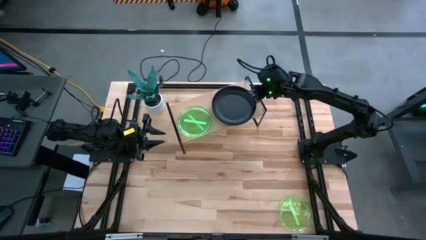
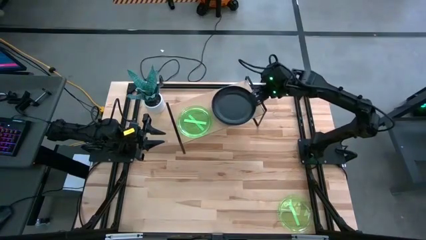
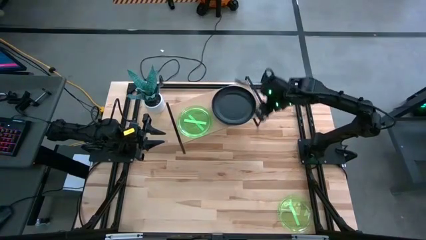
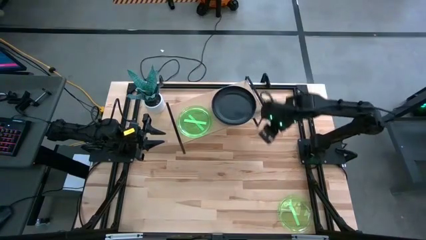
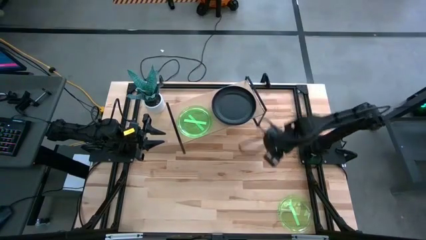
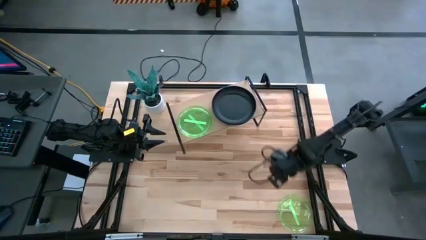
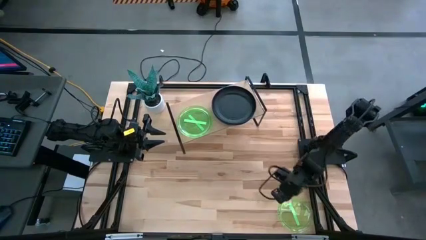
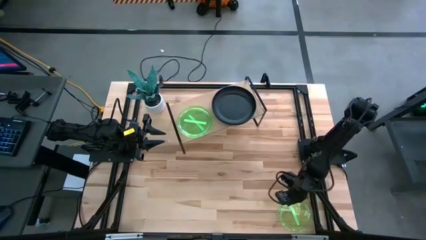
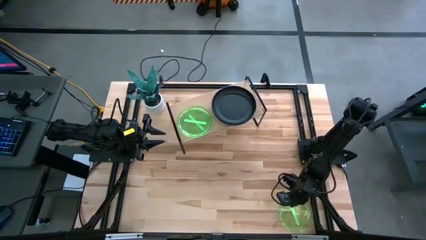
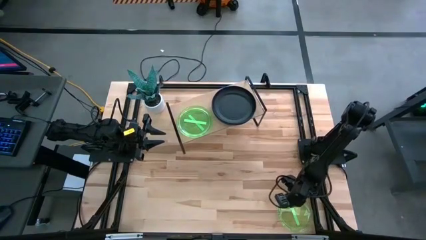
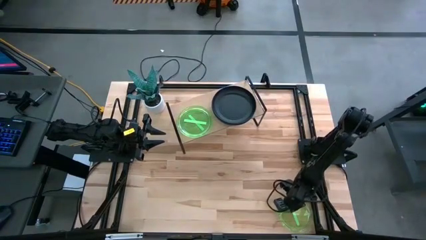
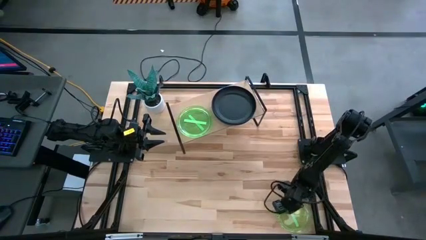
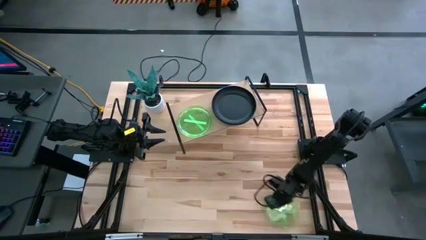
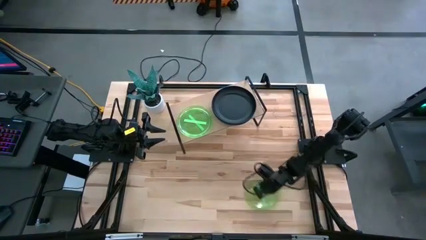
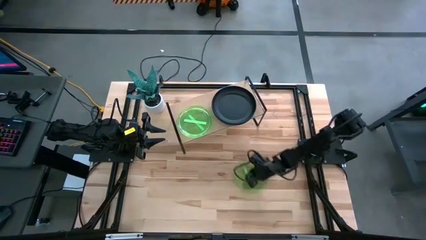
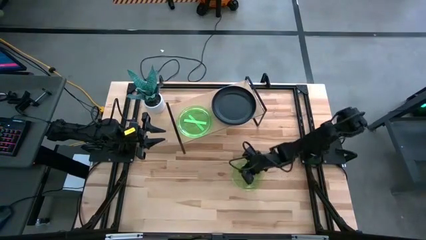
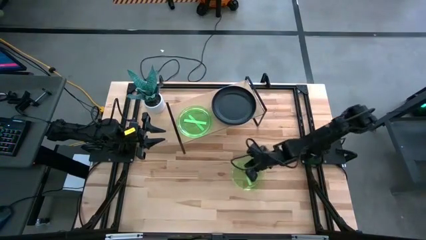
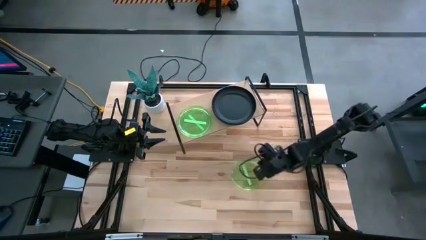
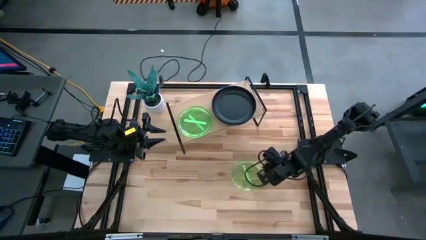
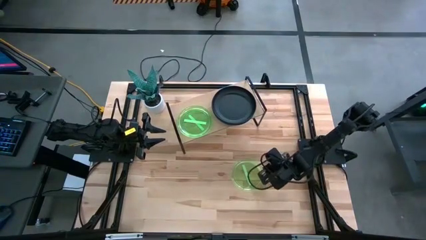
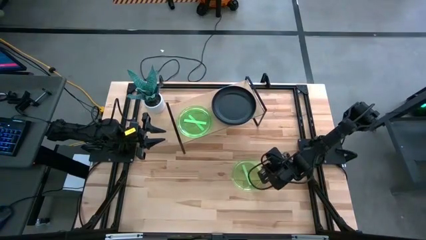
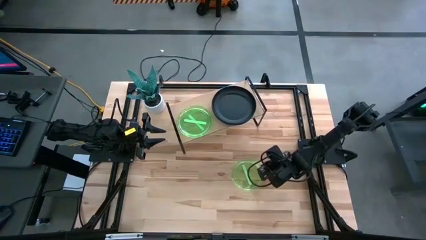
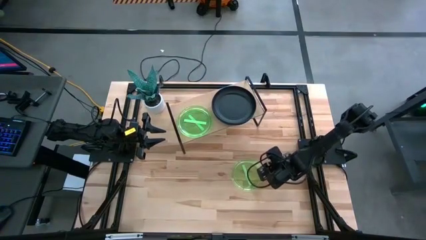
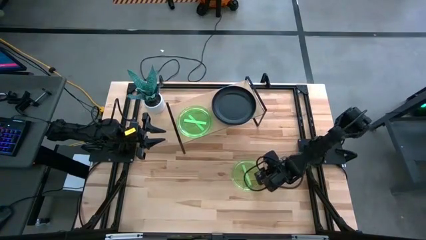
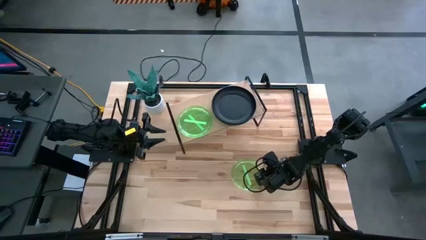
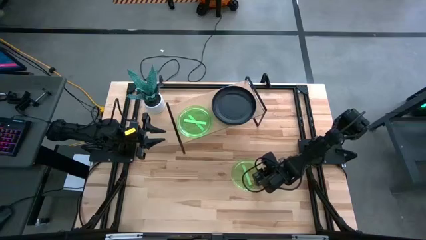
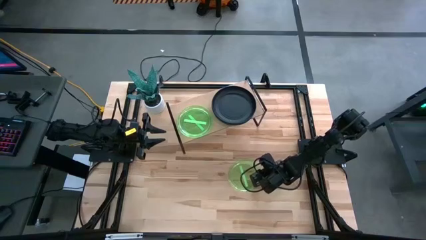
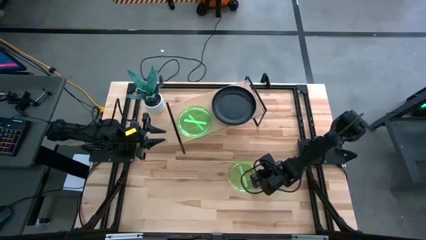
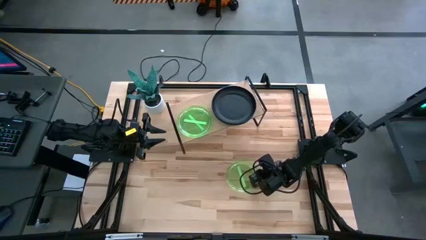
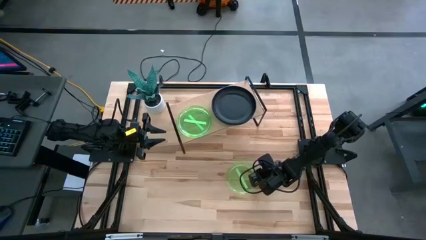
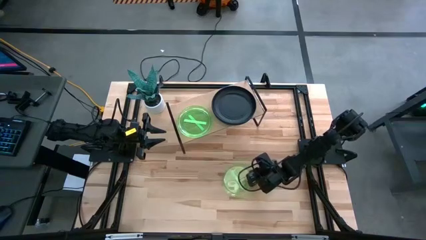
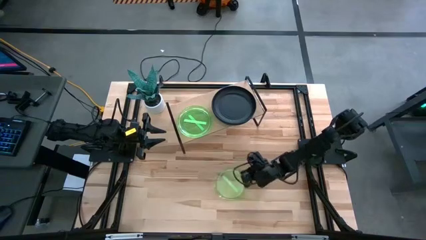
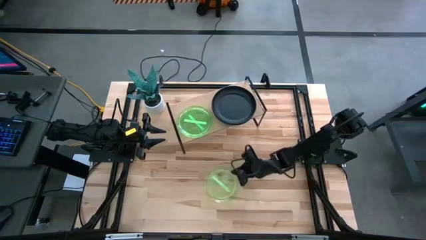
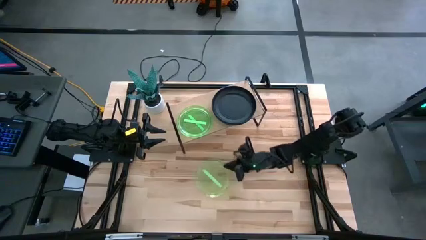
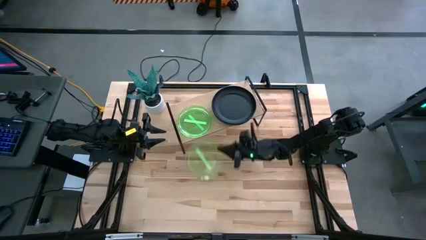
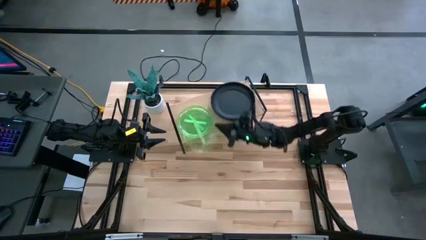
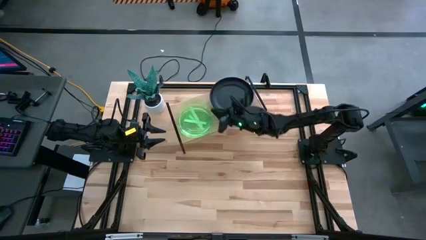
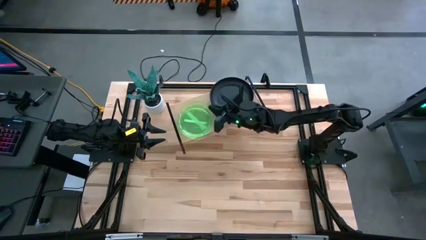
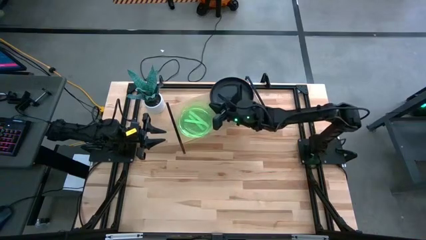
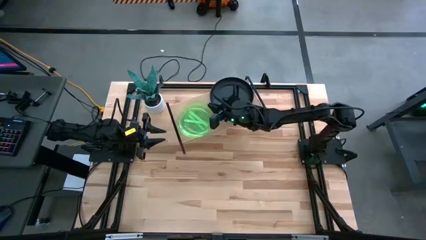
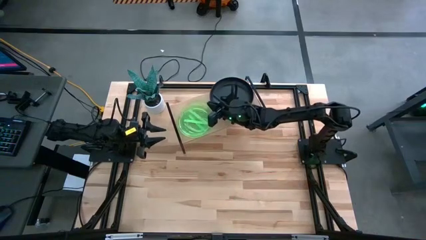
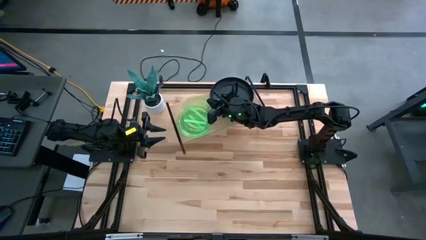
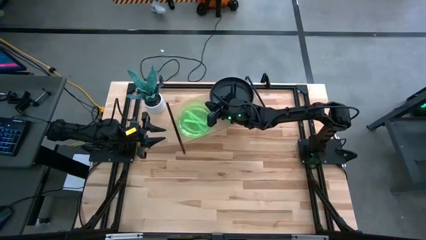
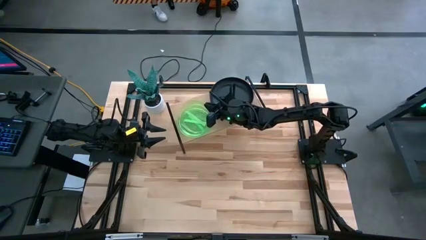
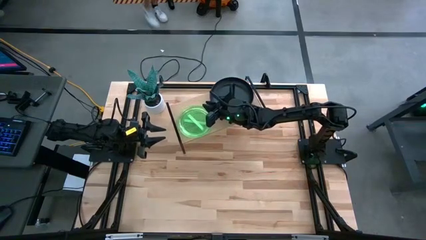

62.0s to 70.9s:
Task: Place and stack plates onto a shelf
Stack the green plate on top of the green plate on the shelf

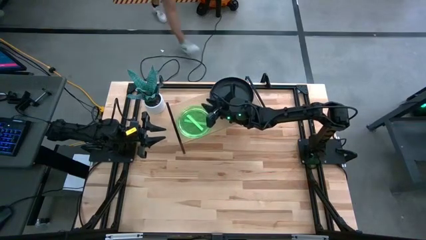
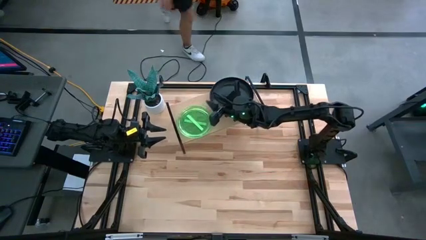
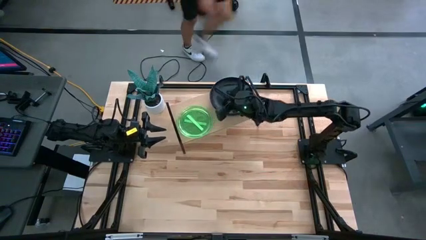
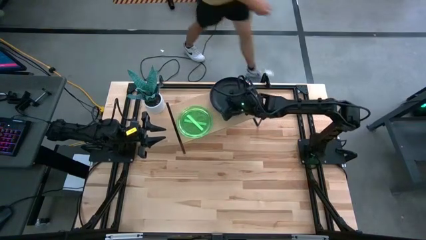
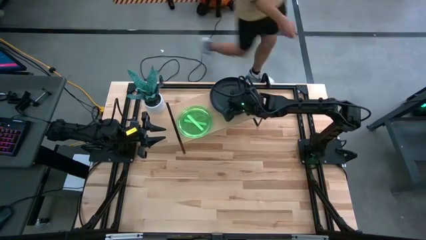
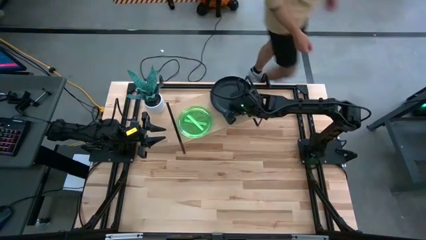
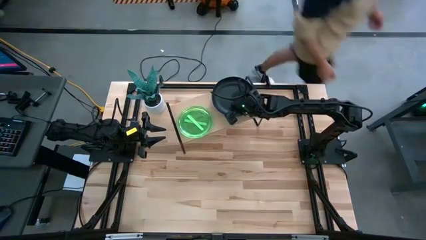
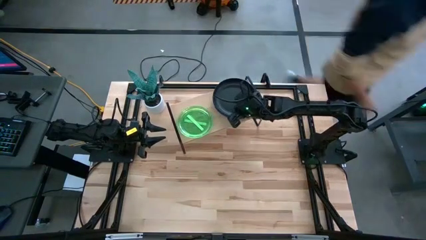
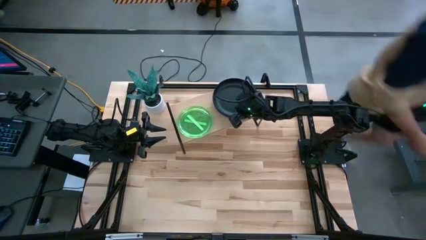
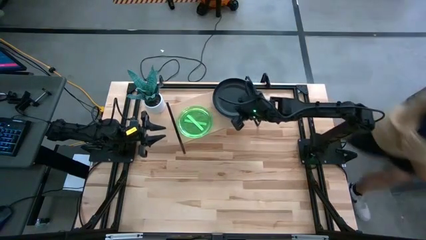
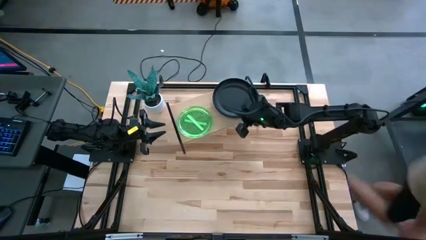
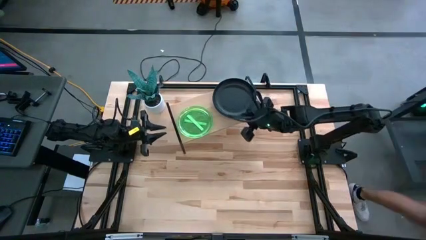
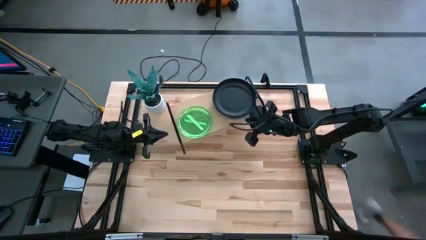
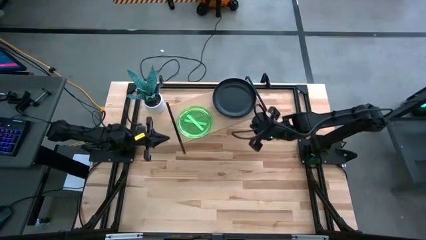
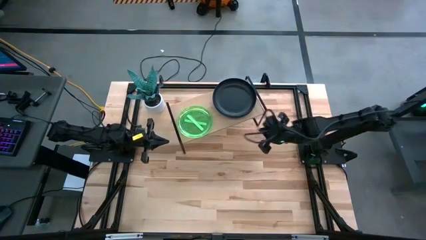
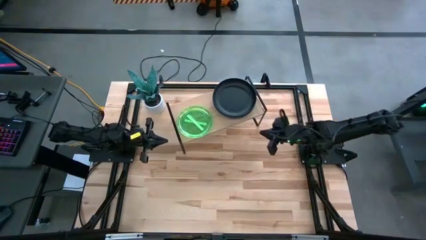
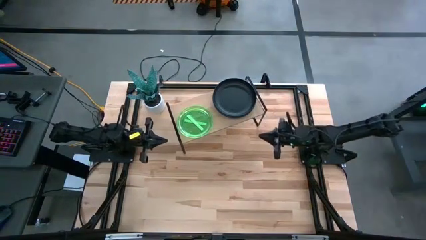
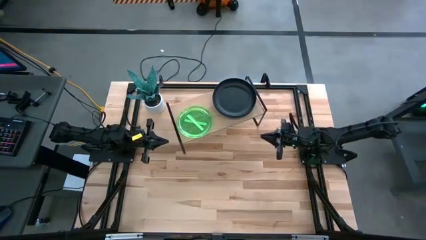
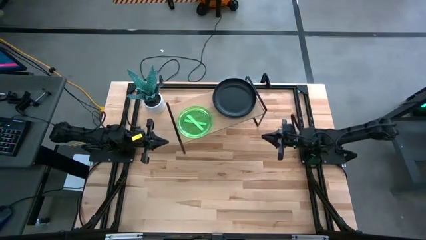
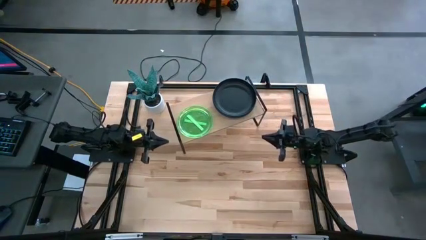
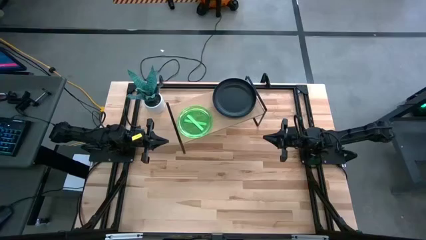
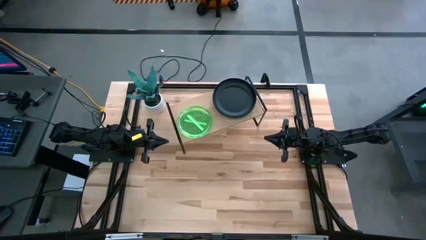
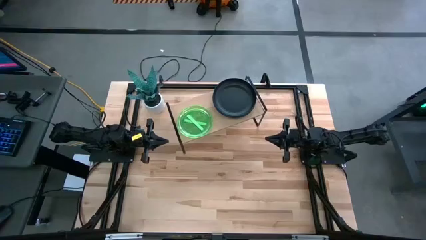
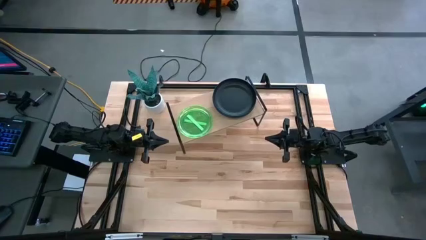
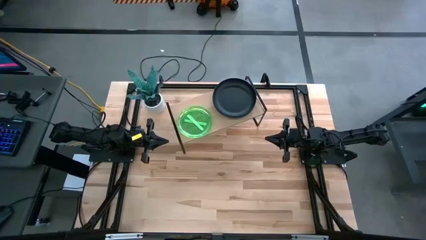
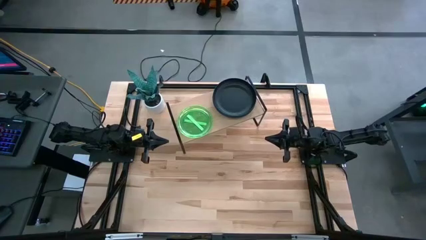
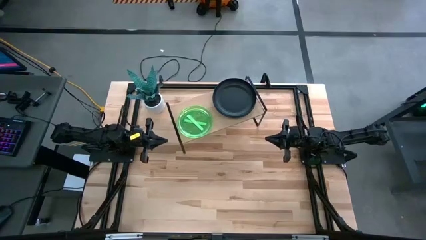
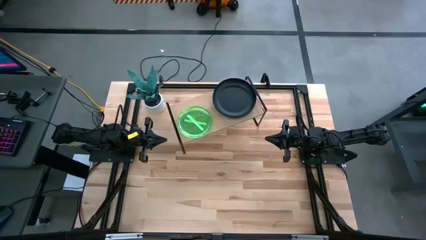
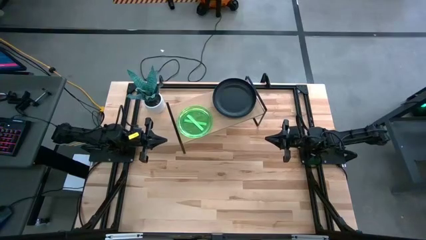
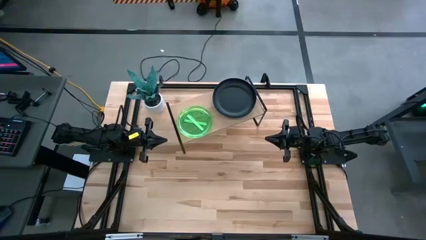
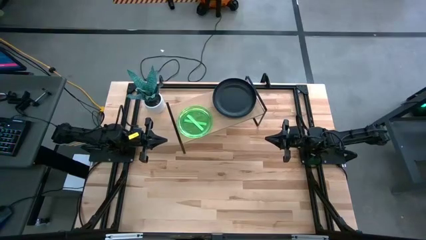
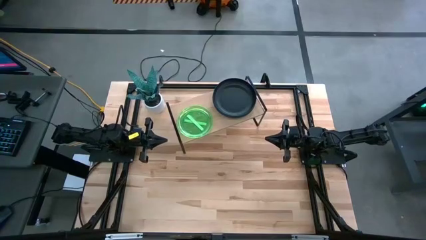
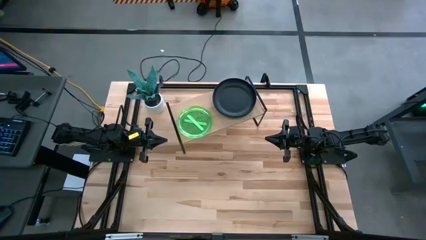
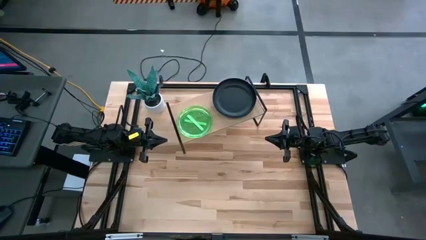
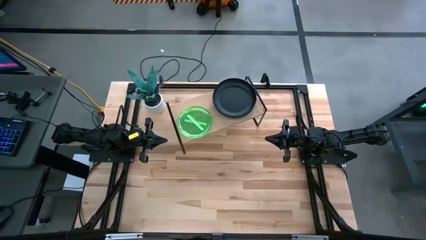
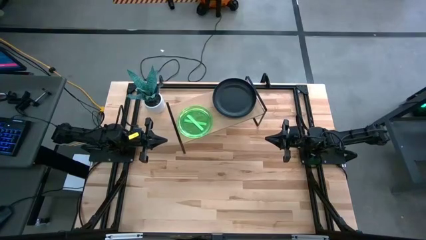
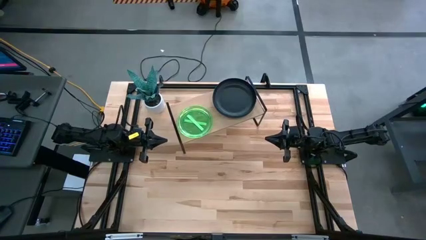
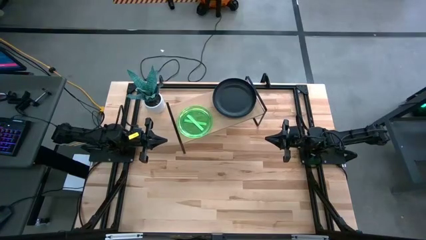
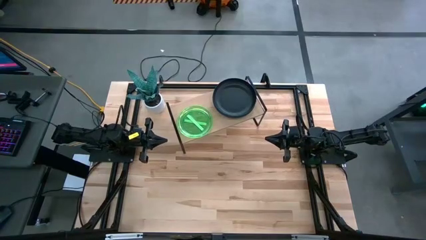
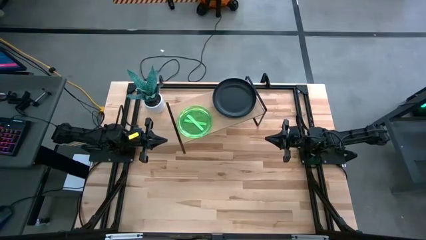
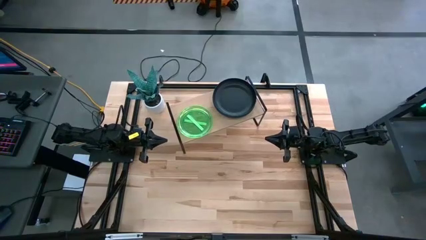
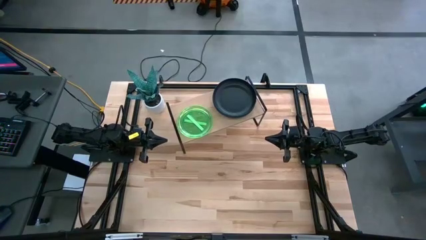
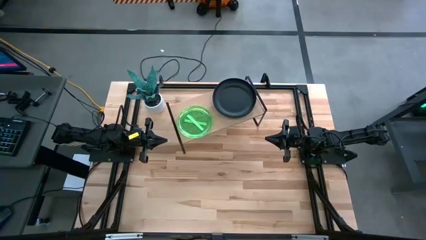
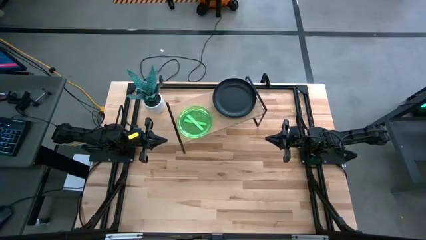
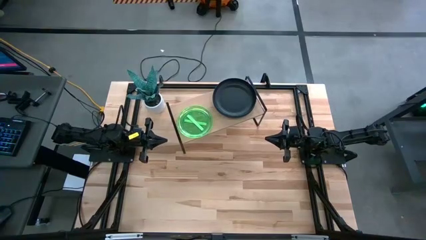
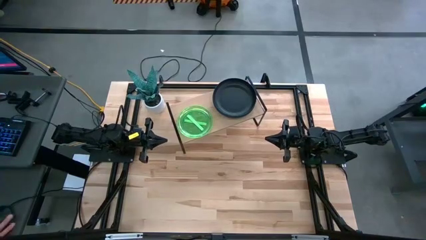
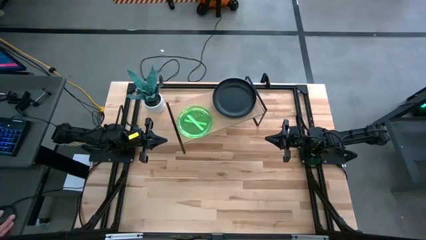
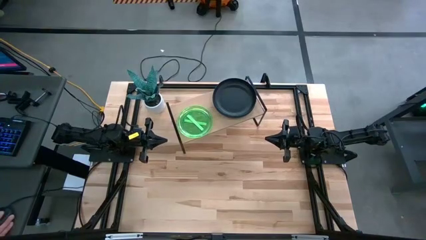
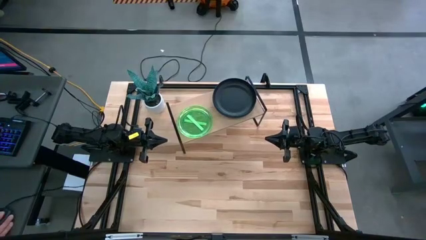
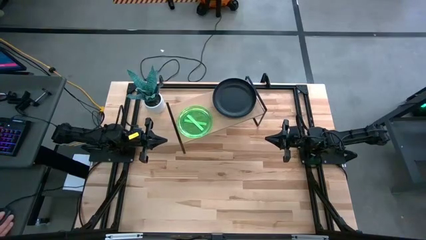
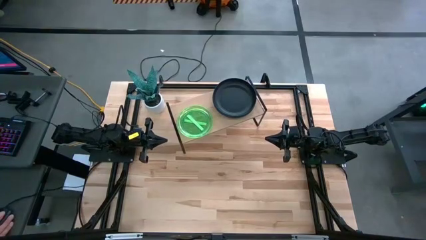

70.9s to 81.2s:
Return to Home Position
